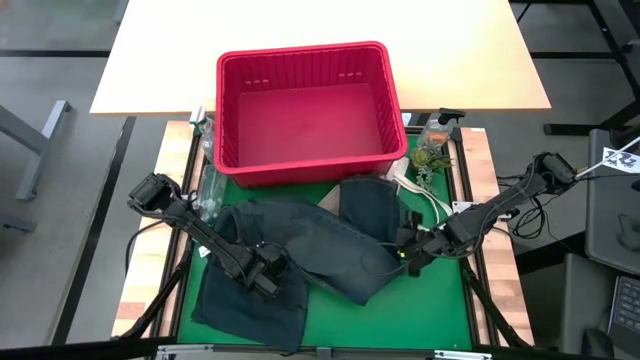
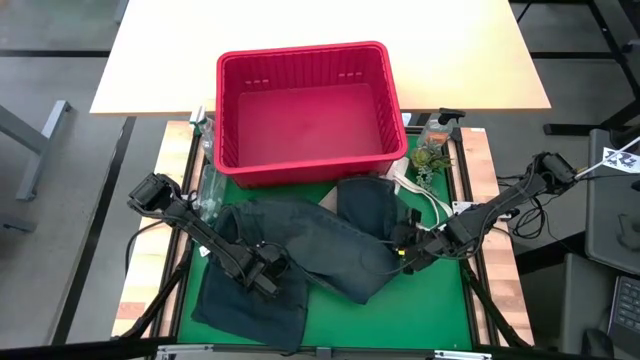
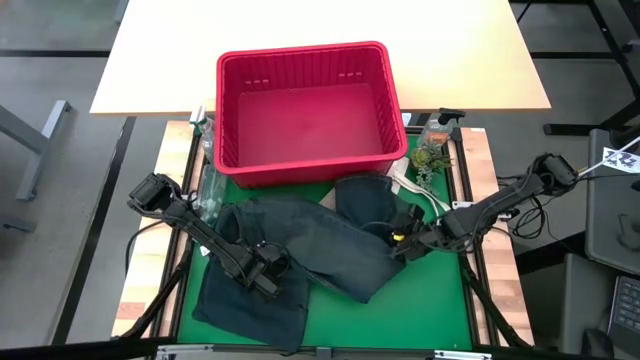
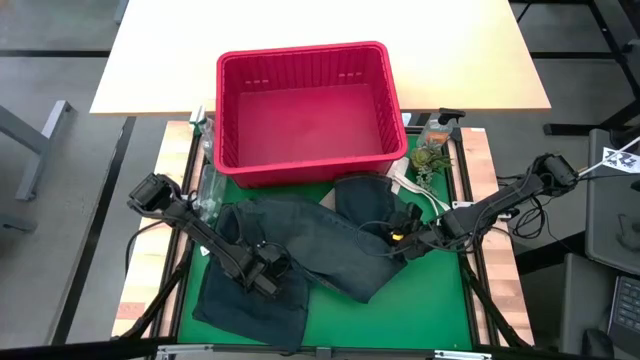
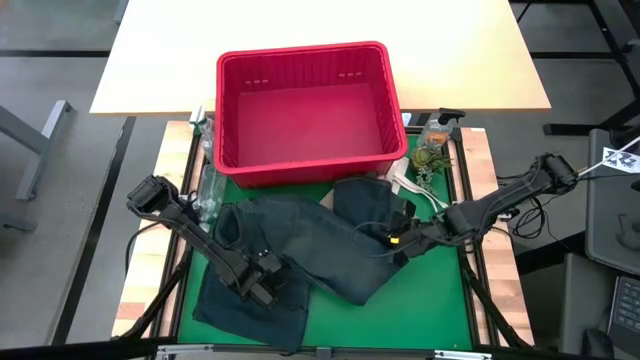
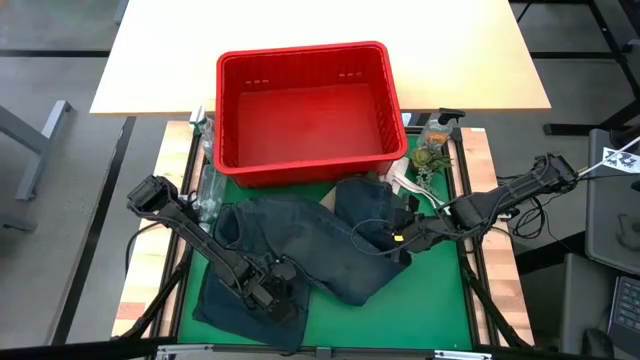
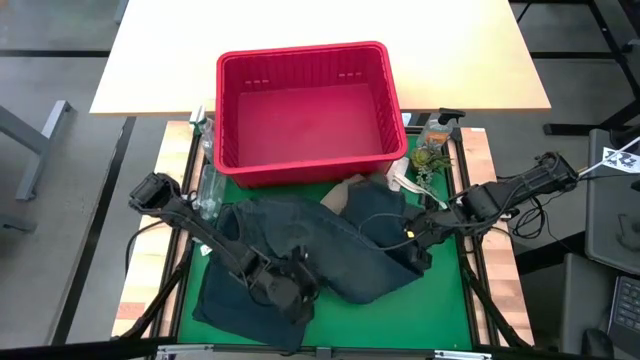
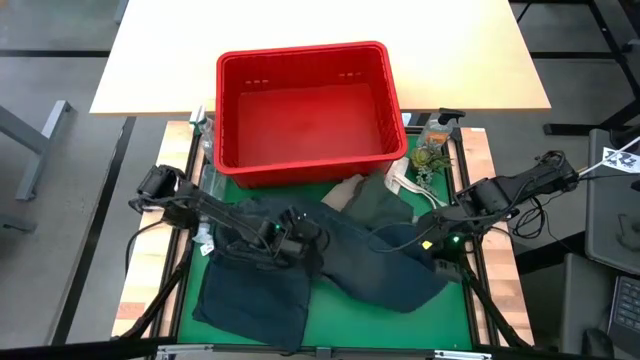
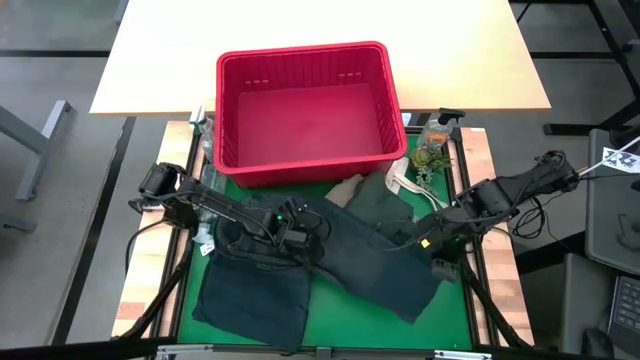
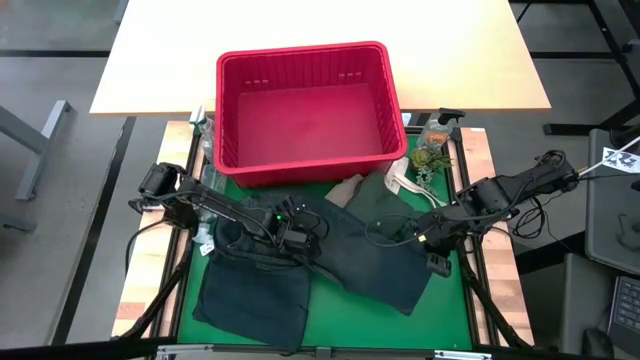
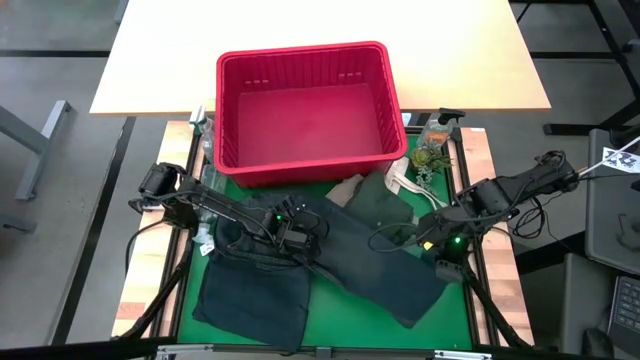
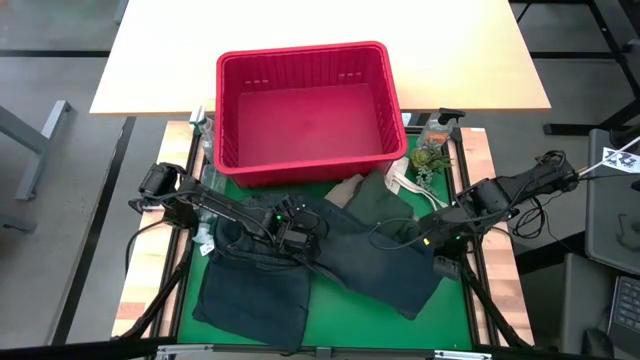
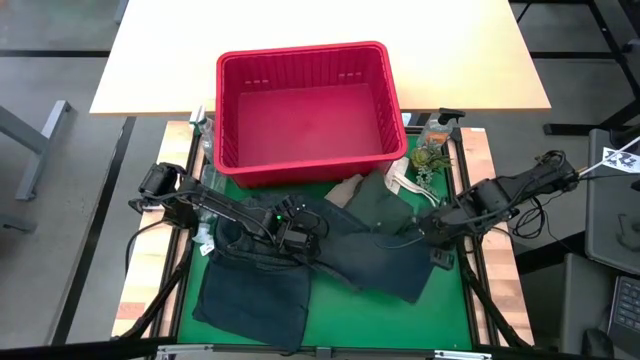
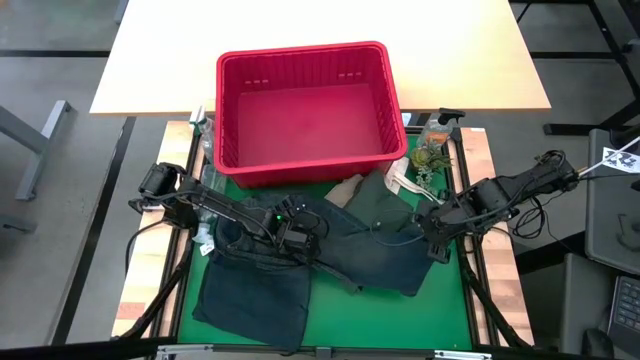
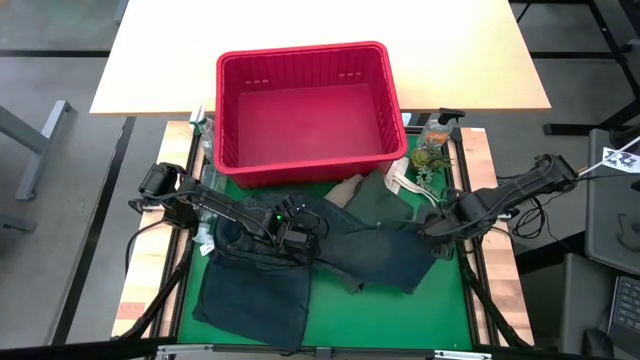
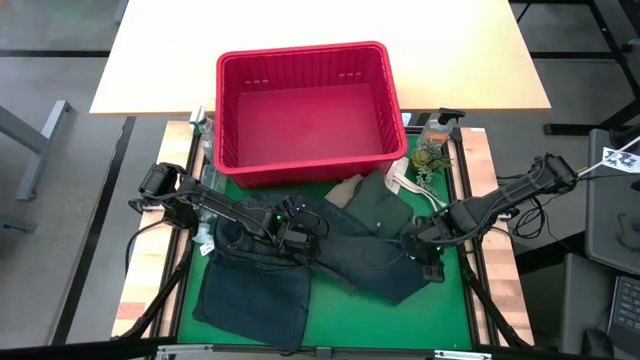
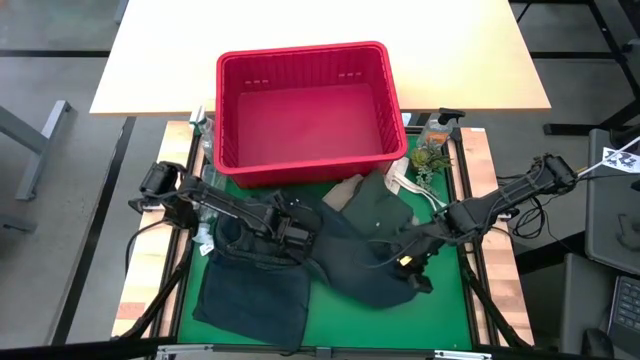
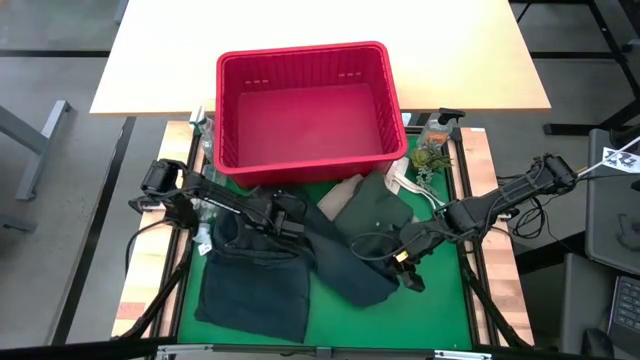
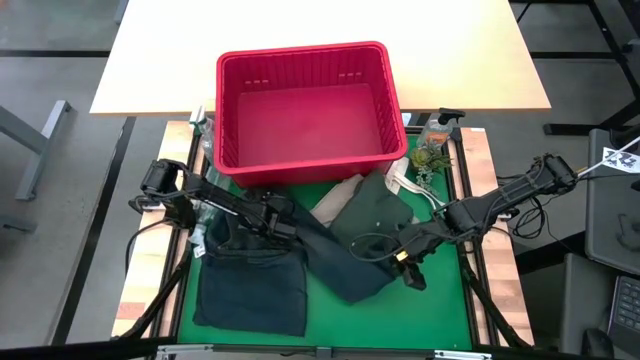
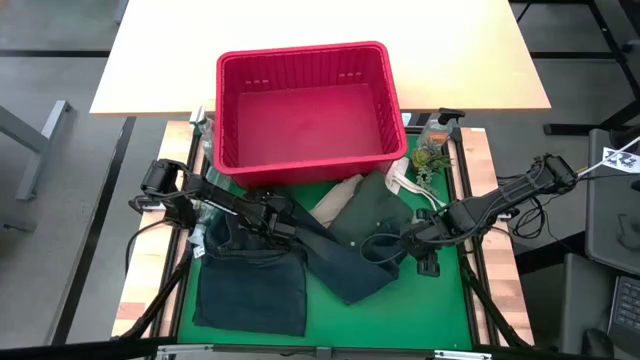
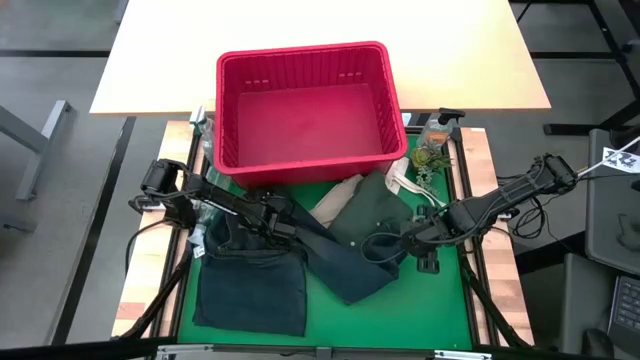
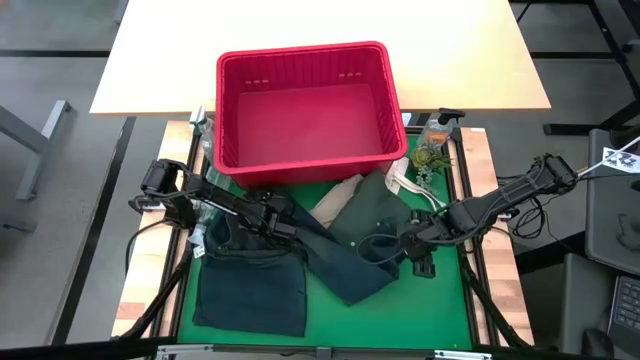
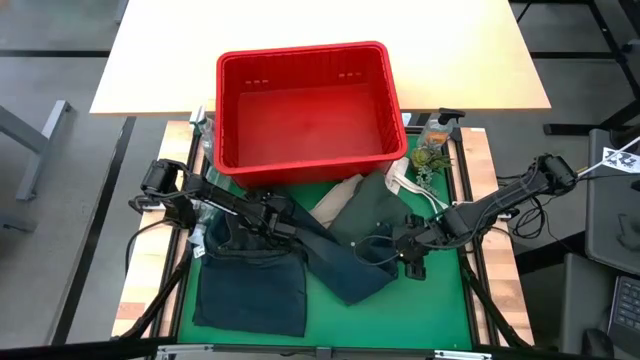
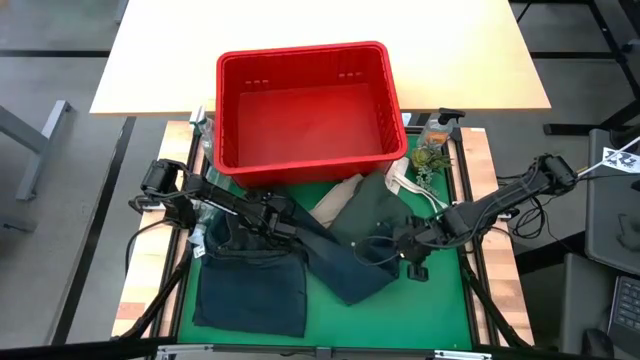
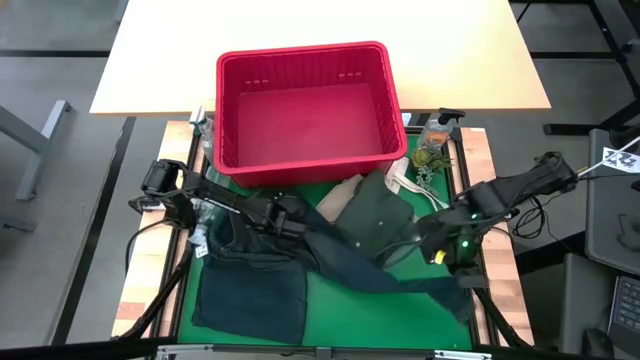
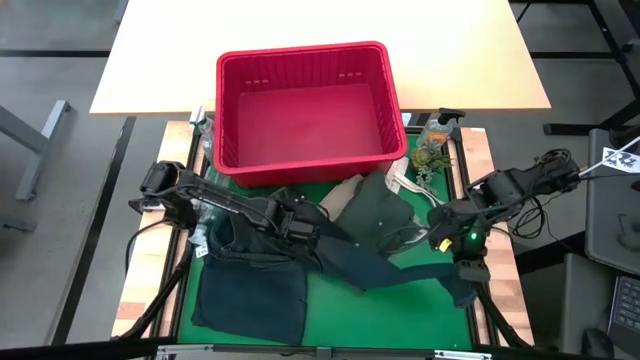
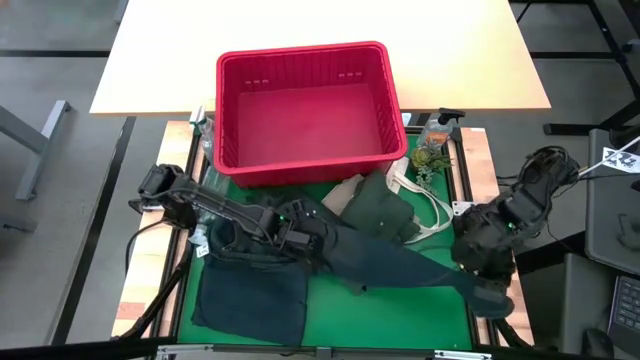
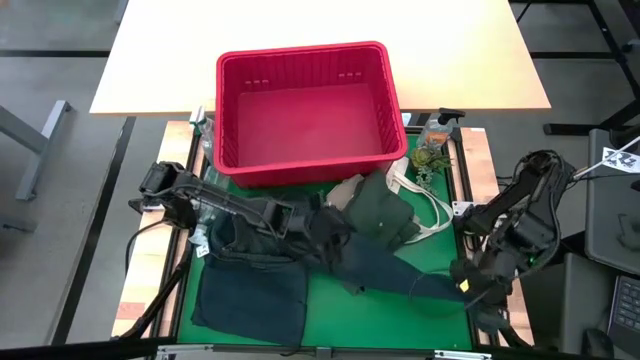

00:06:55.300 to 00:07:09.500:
Task: Fold laundry
Fold the dark blue pants

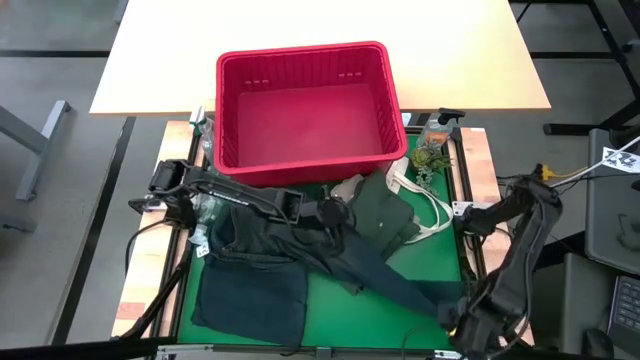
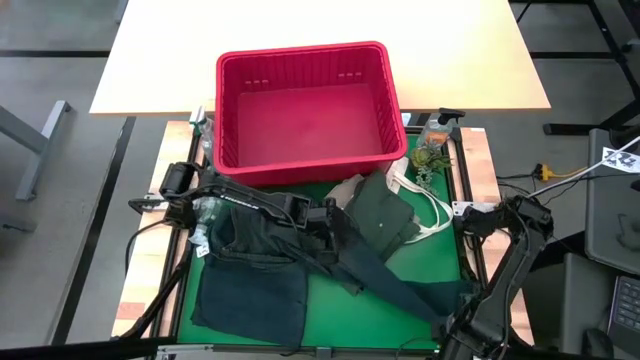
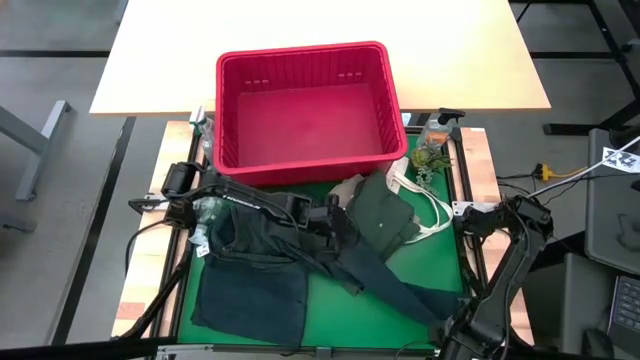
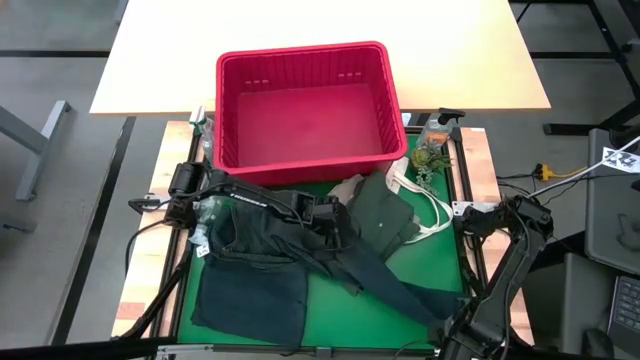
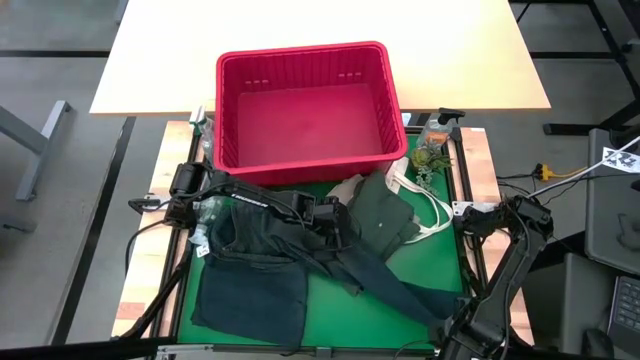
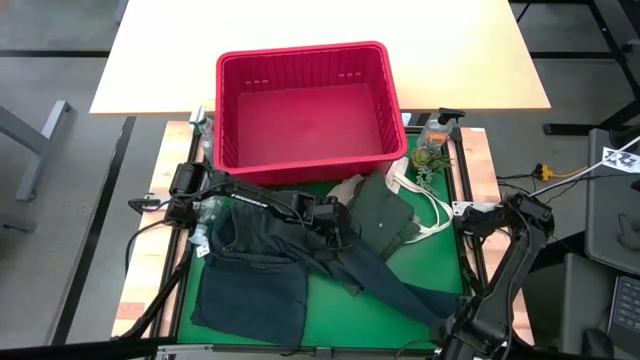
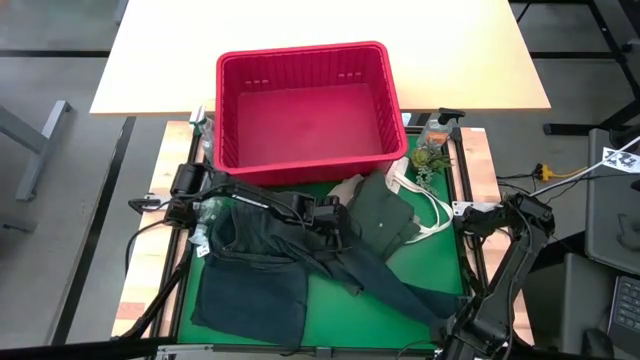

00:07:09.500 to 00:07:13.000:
Fold the dark blue pants

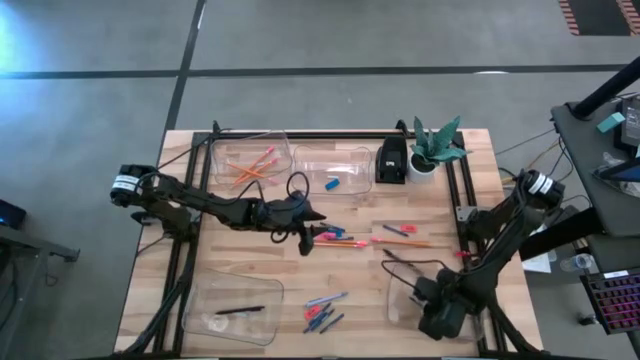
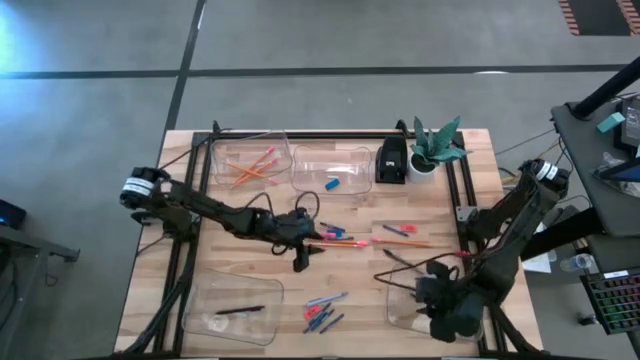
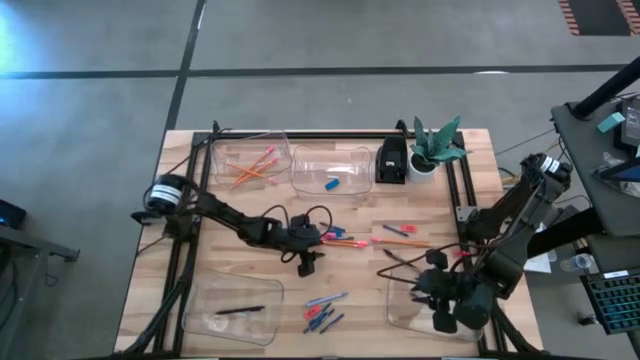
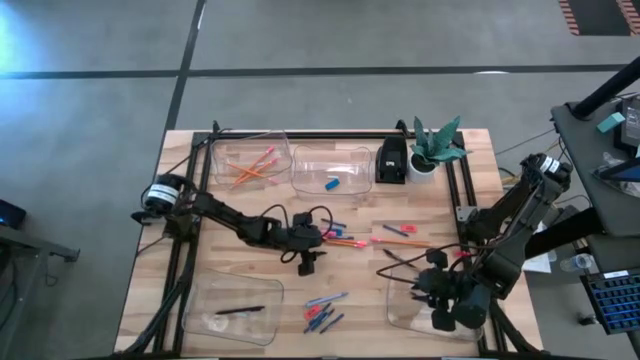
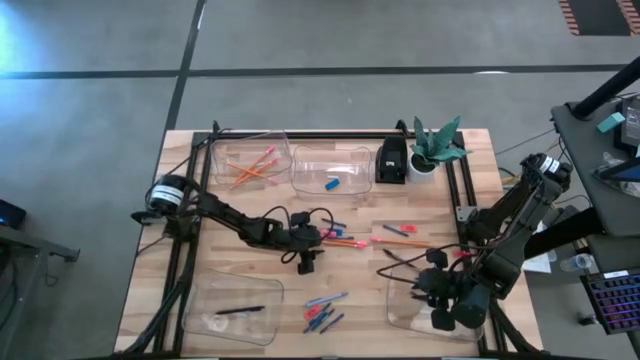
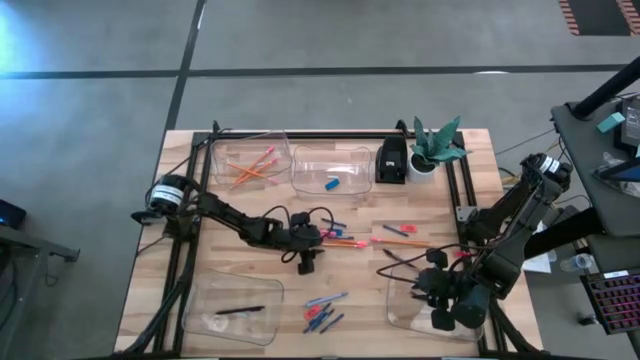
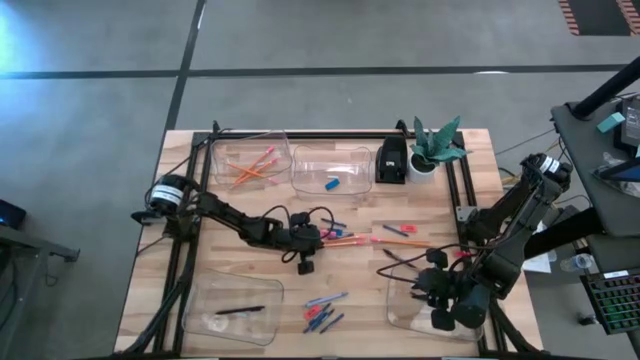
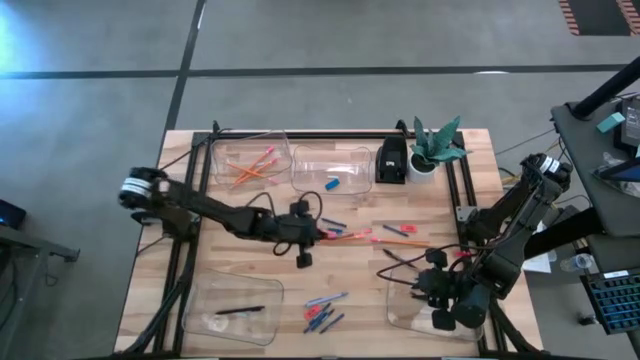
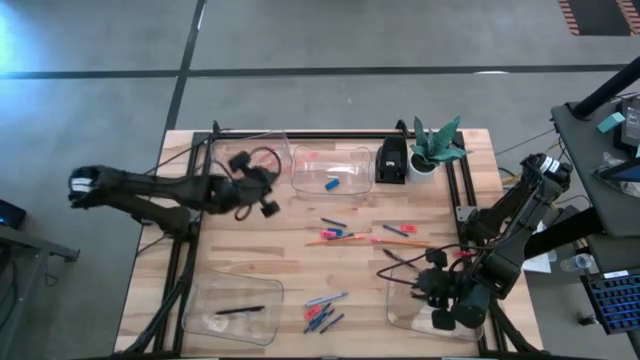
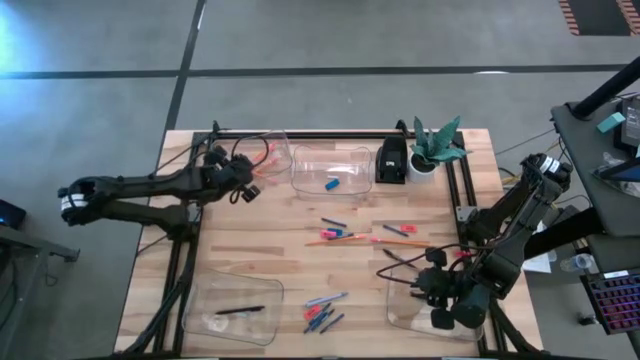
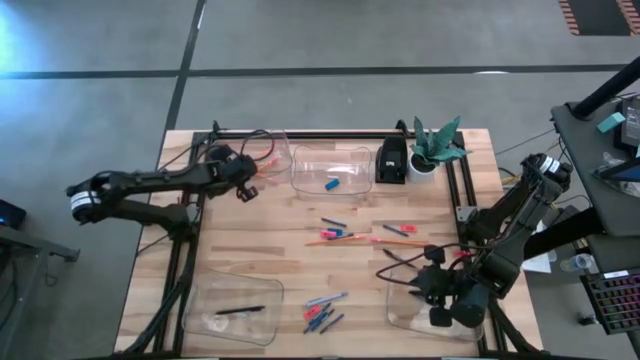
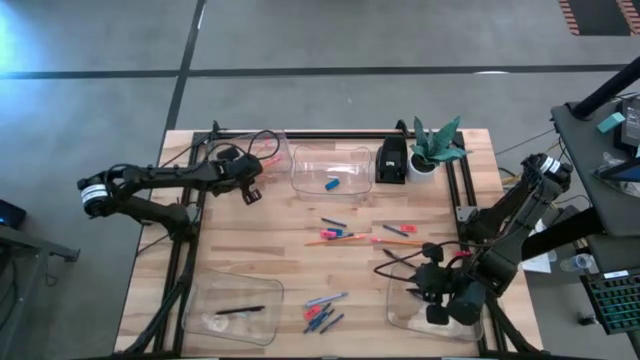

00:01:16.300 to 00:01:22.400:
Task: Sort crayons/erasers/pens/pencils in bins
Put the orange pencil into the top left transparent bin
